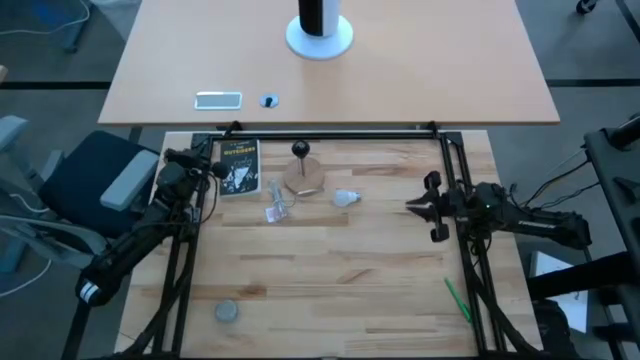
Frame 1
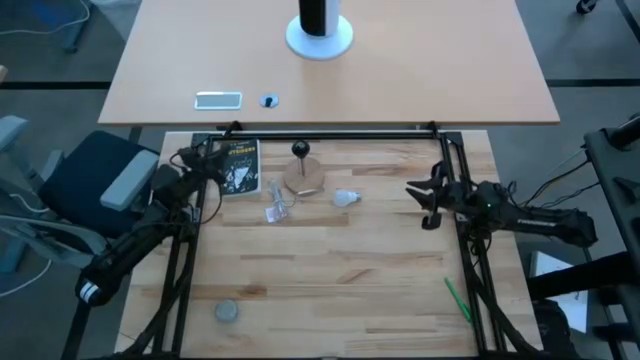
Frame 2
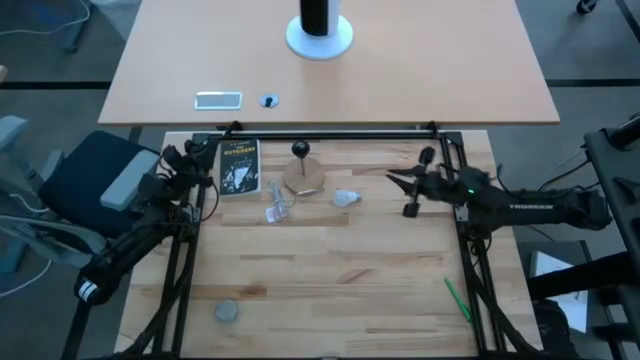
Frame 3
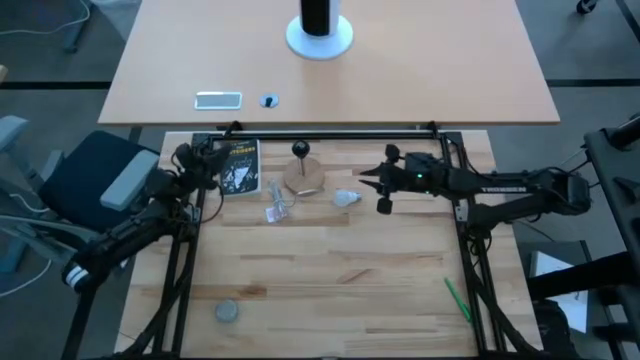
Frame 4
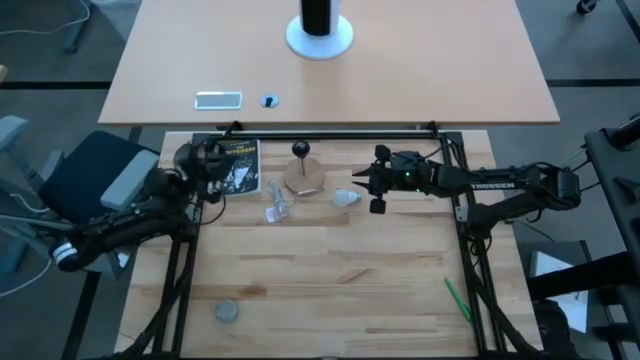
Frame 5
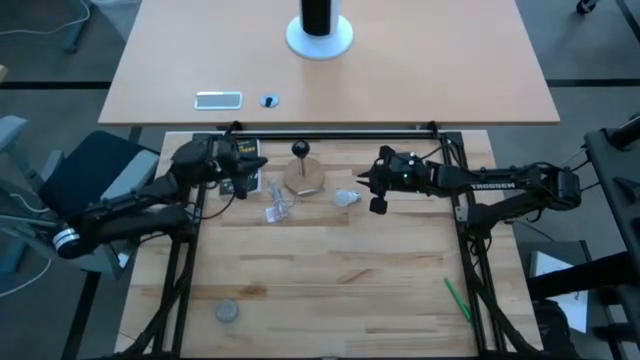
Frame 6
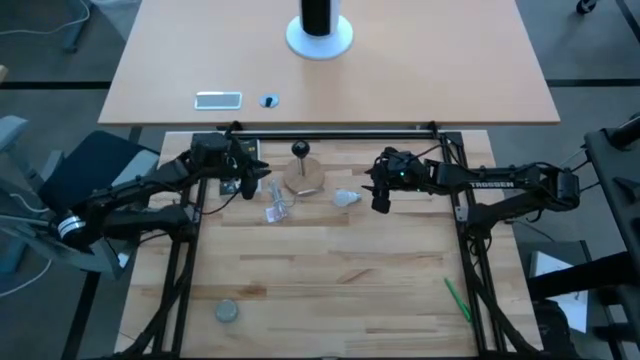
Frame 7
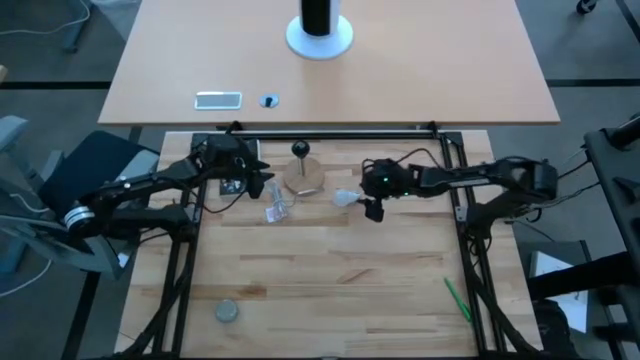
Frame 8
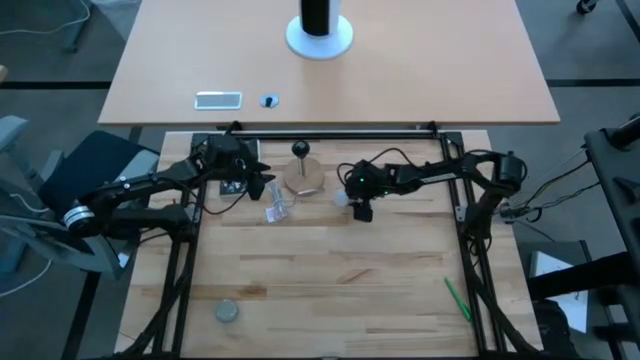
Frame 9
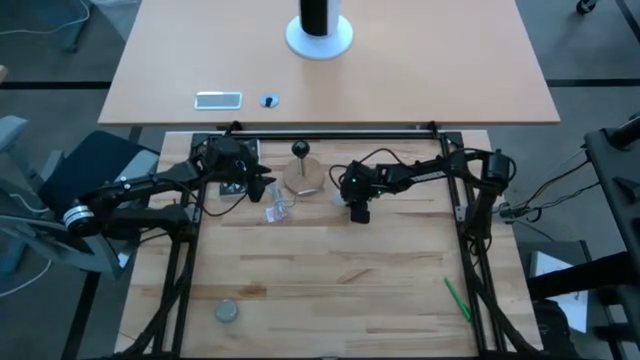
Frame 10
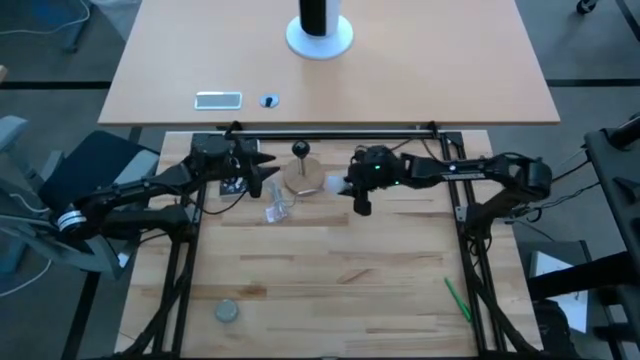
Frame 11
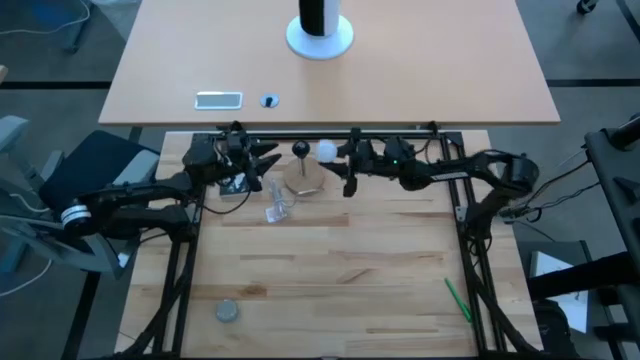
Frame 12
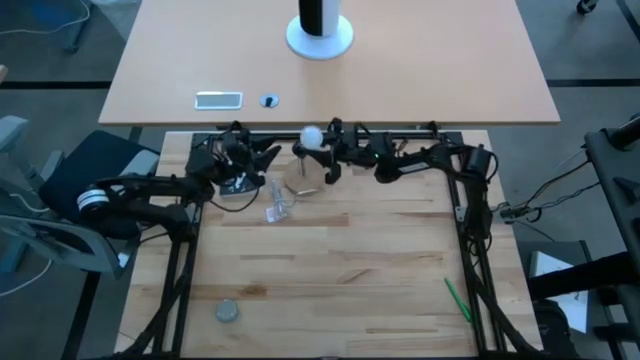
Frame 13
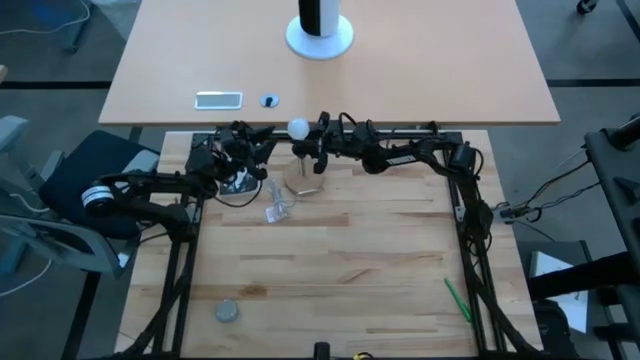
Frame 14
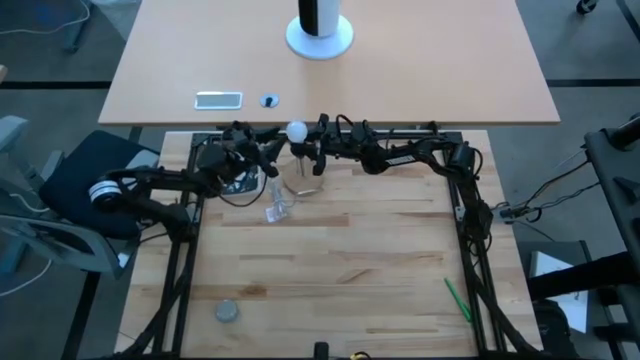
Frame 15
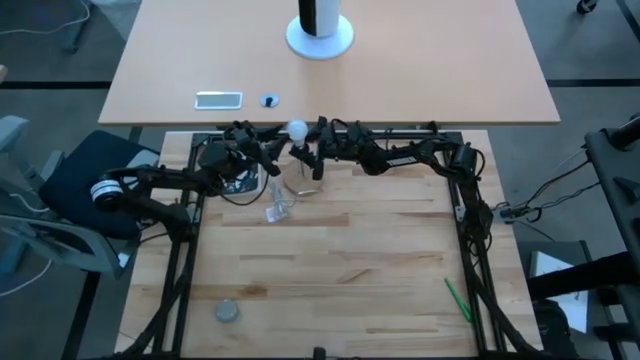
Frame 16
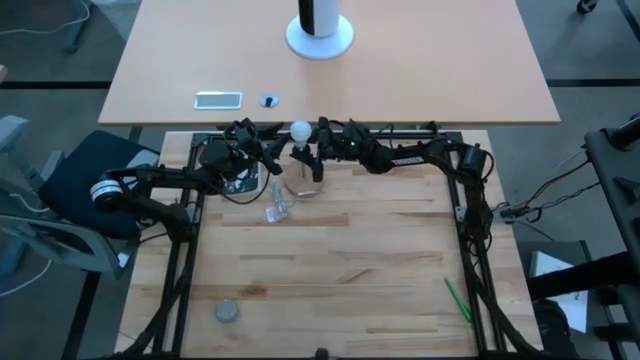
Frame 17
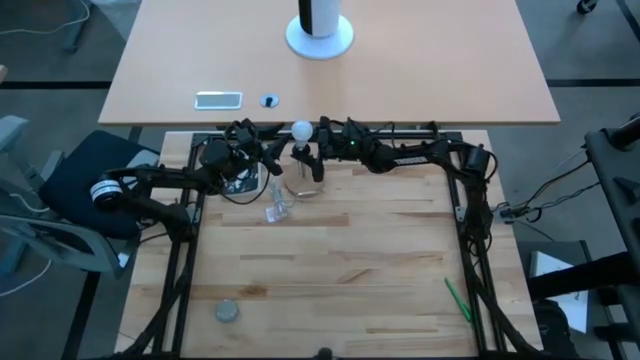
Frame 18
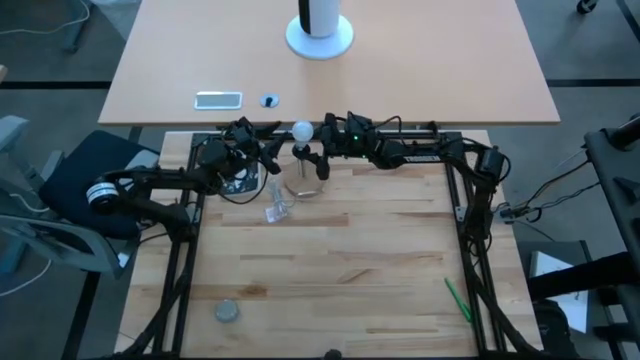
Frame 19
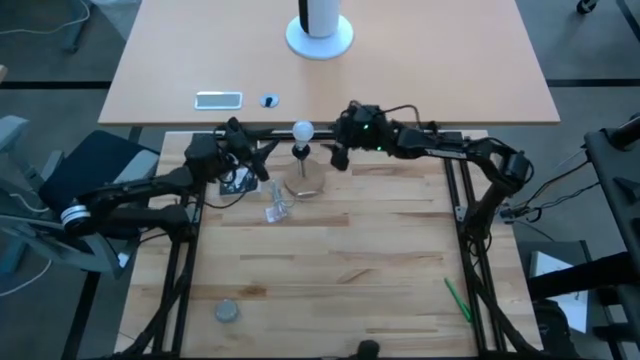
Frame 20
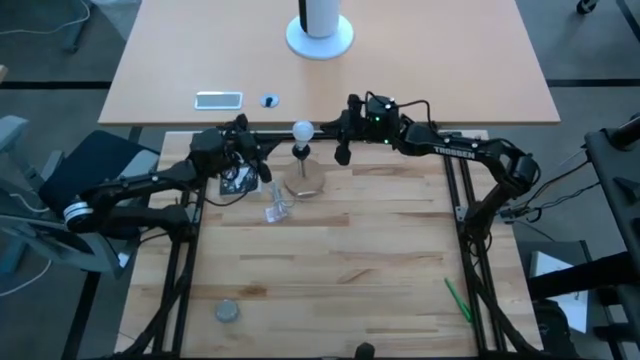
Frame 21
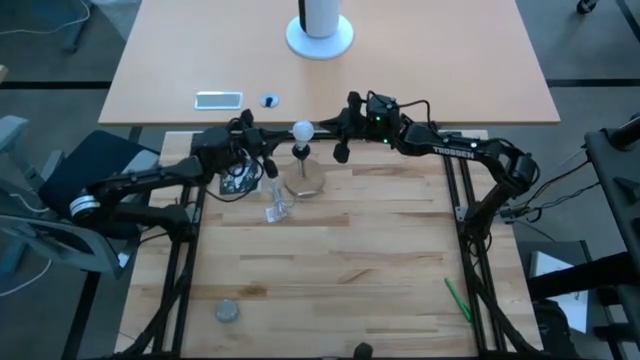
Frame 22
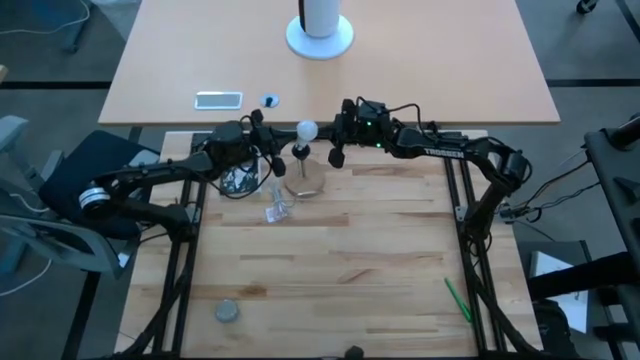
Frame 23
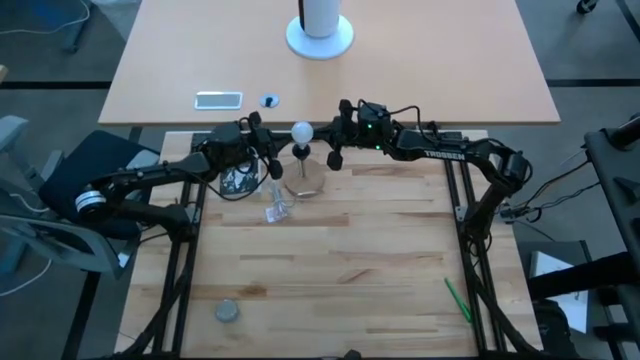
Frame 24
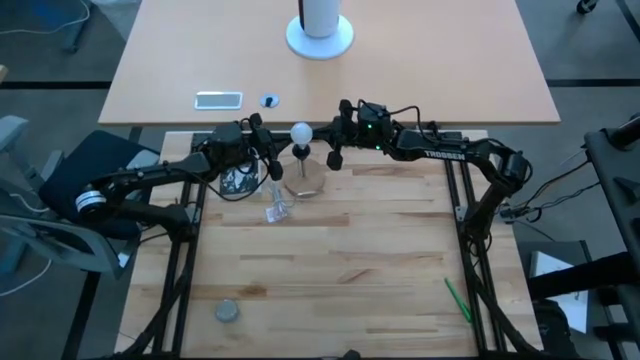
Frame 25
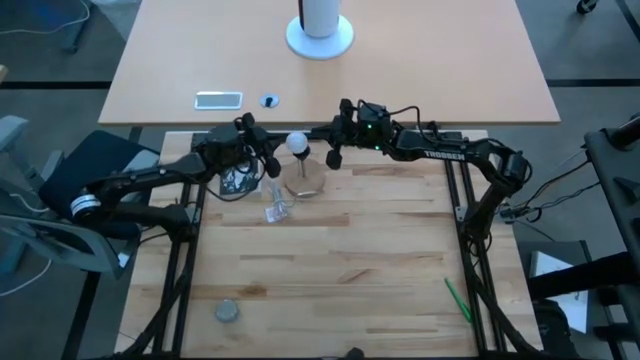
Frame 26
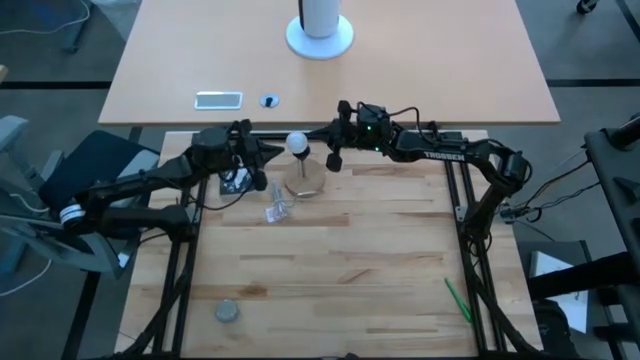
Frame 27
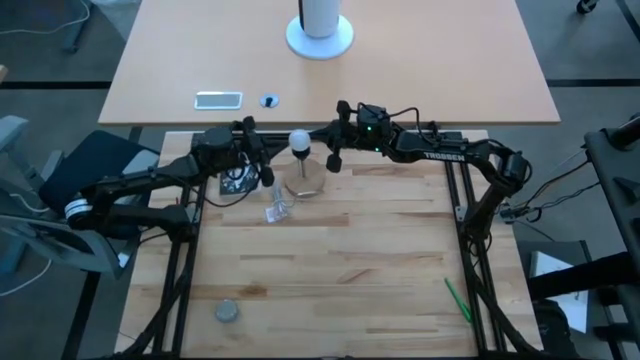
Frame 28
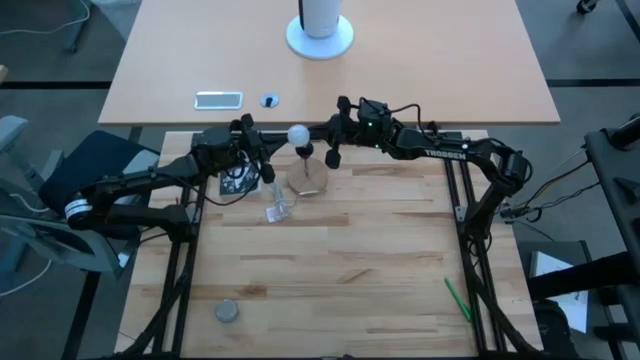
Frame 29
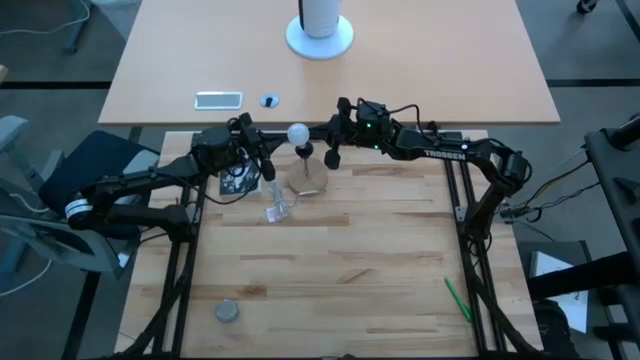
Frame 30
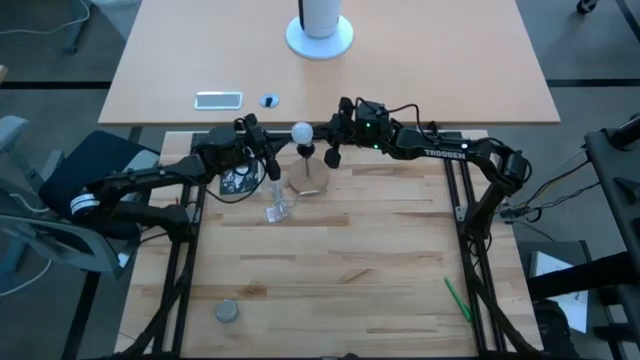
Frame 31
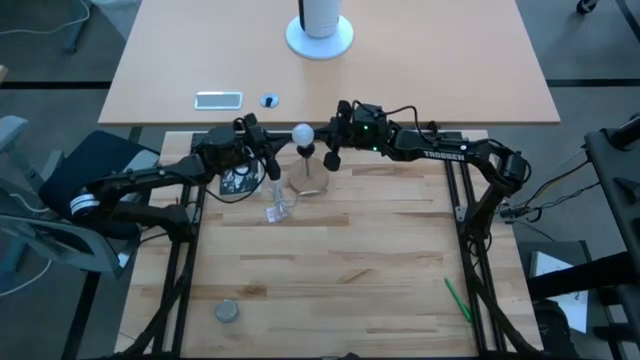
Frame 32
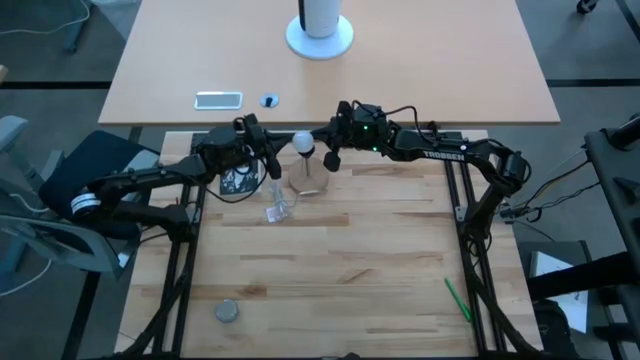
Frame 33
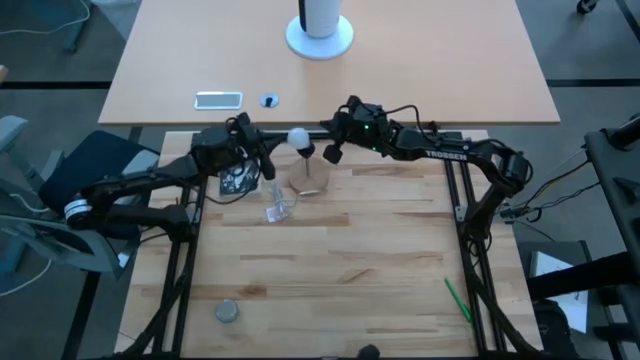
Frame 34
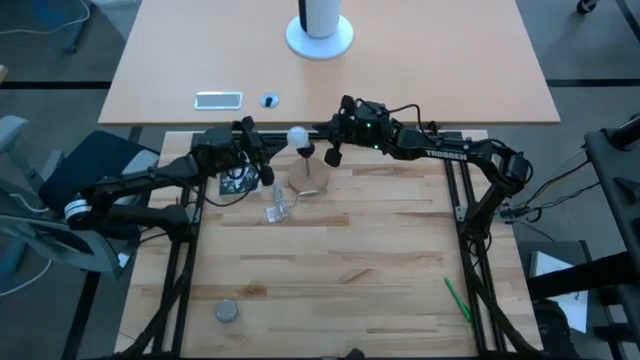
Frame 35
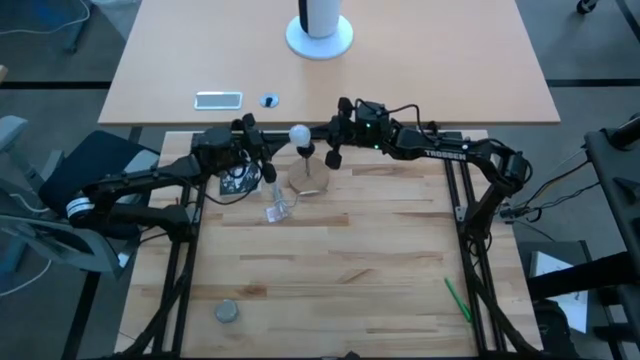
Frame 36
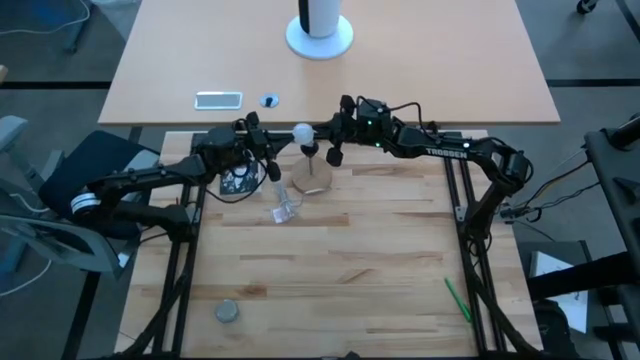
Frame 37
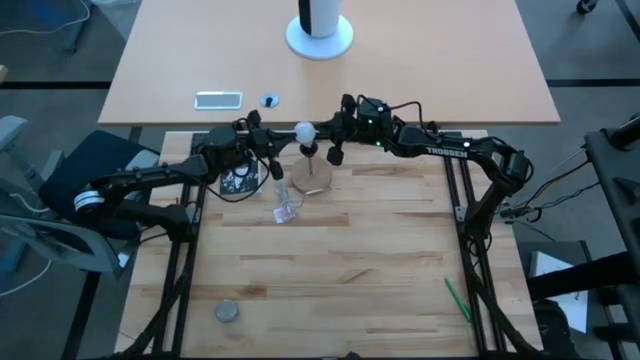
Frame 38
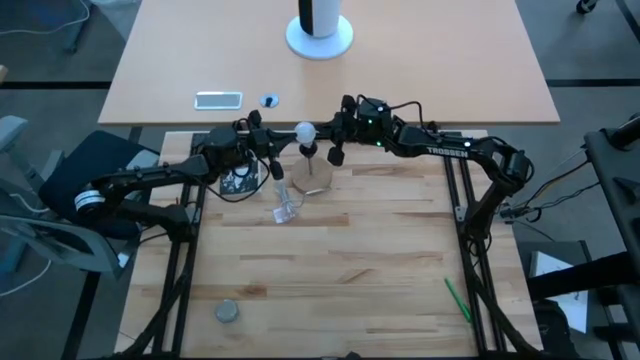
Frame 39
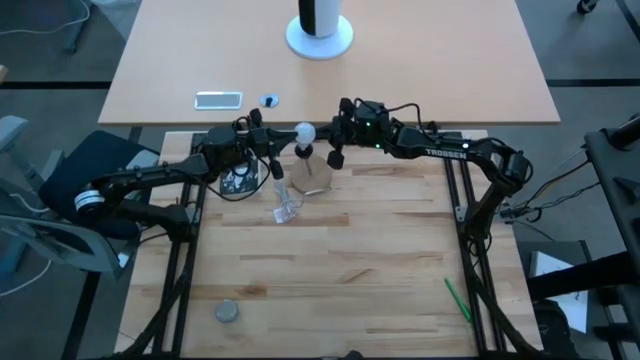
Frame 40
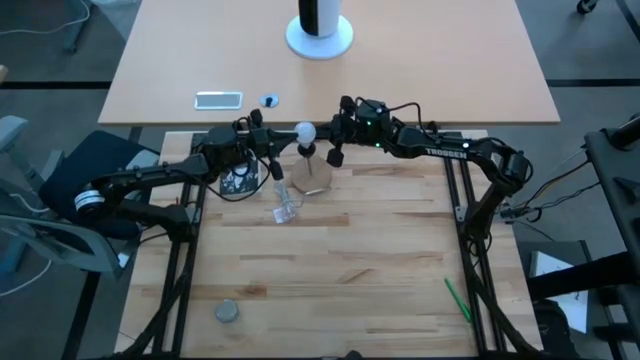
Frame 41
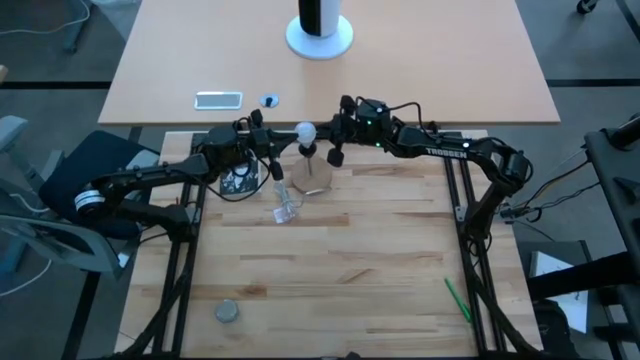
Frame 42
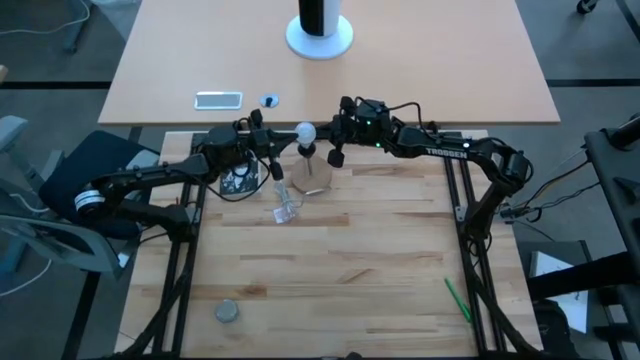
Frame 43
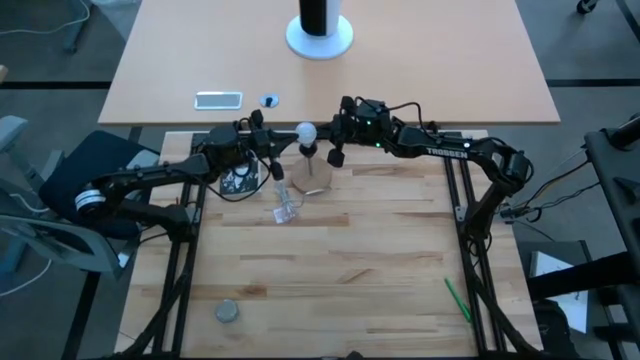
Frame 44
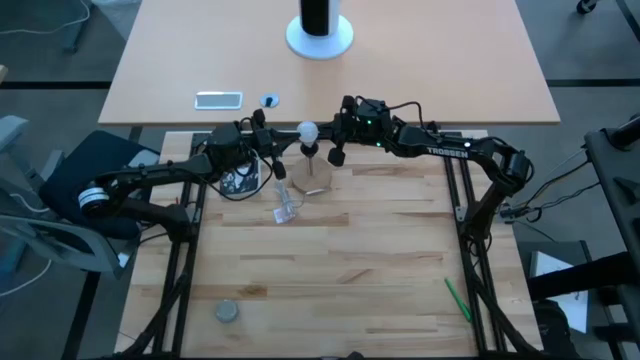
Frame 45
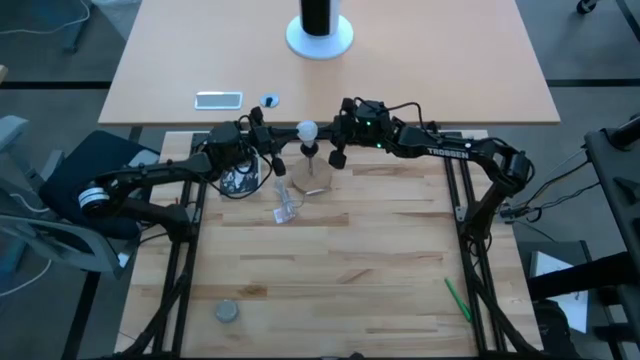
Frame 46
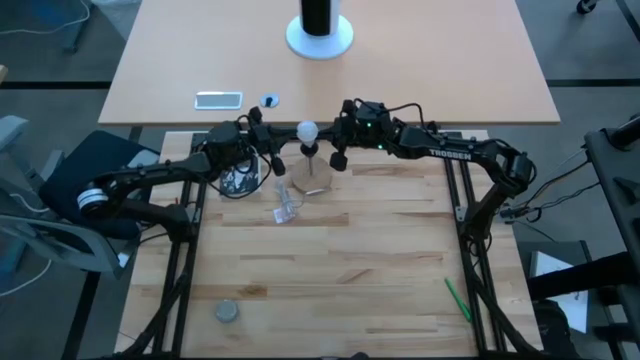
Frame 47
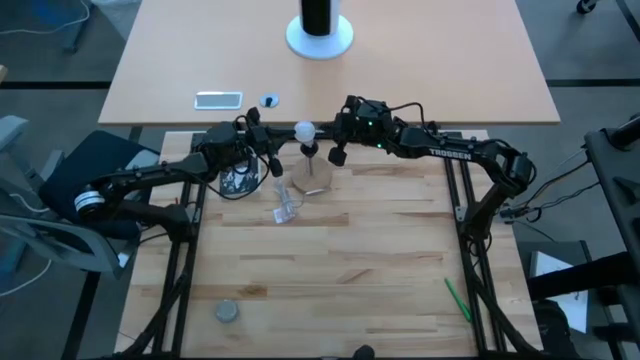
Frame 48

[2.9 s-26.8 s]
Task: Screw lightbulb
Insert the lightbulb into the lamp
